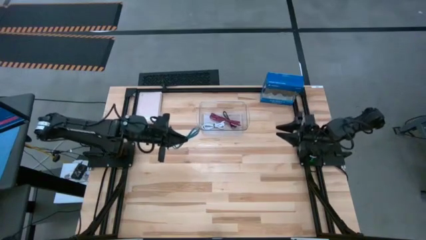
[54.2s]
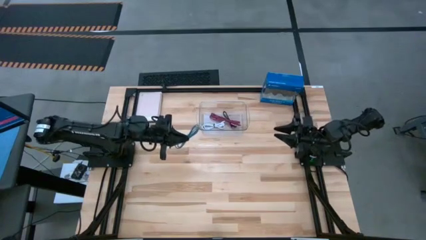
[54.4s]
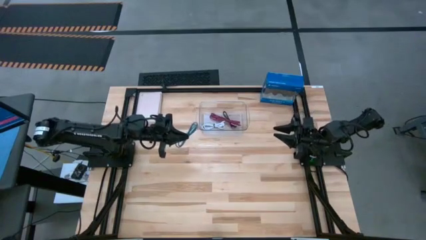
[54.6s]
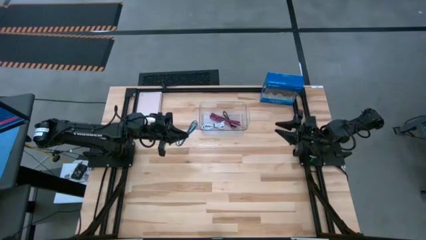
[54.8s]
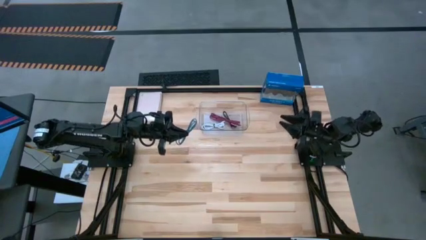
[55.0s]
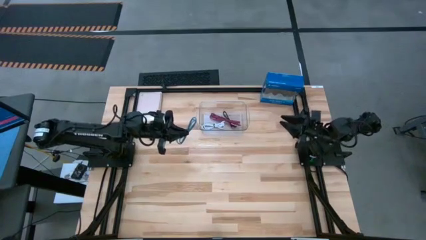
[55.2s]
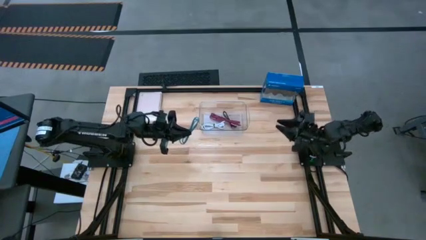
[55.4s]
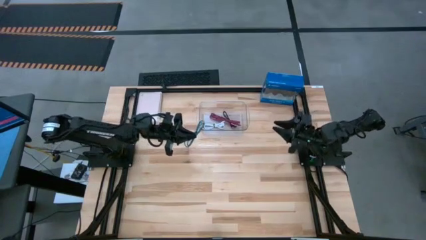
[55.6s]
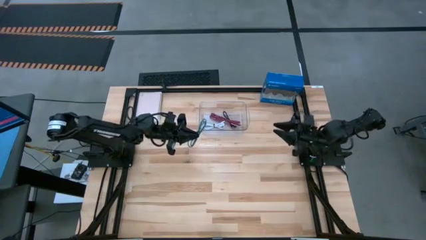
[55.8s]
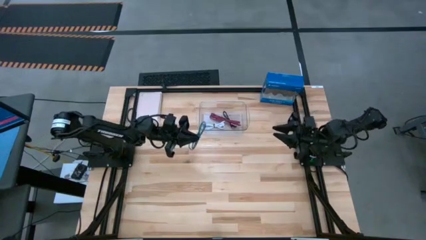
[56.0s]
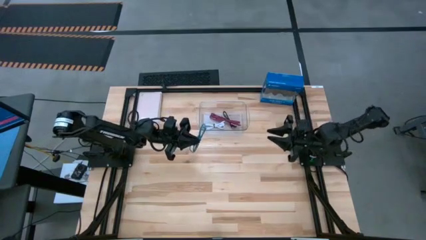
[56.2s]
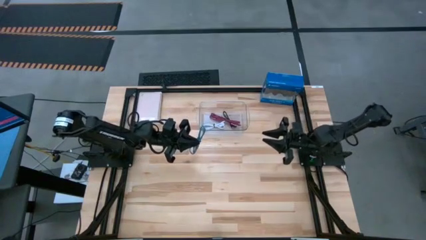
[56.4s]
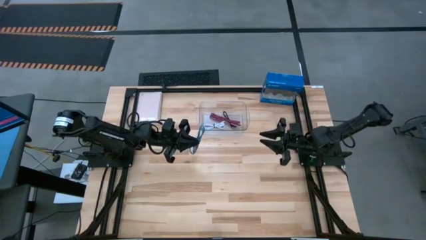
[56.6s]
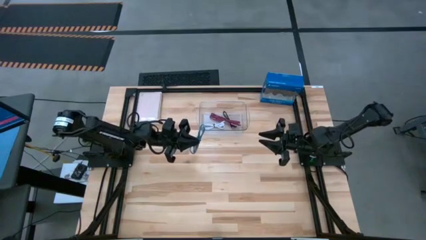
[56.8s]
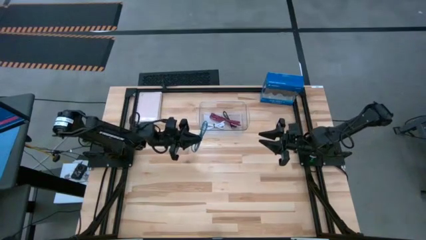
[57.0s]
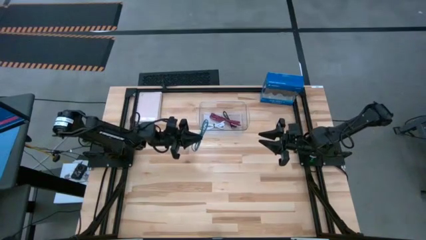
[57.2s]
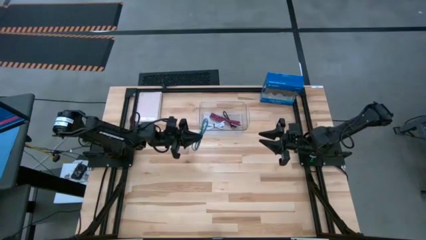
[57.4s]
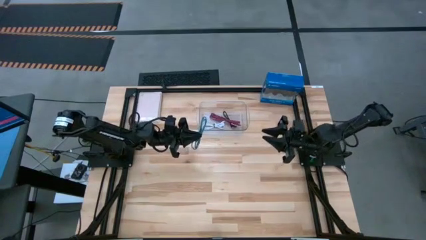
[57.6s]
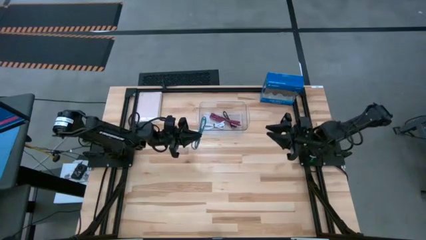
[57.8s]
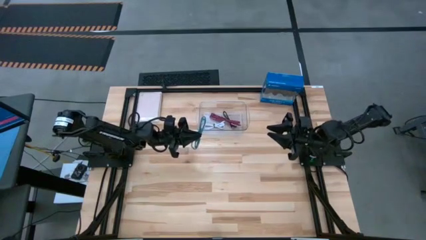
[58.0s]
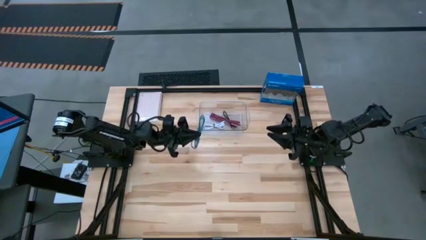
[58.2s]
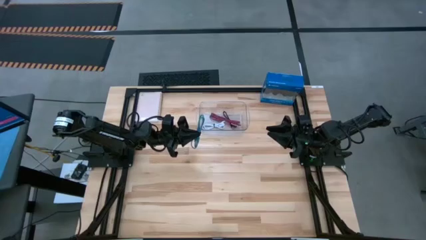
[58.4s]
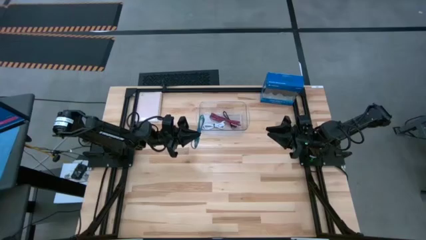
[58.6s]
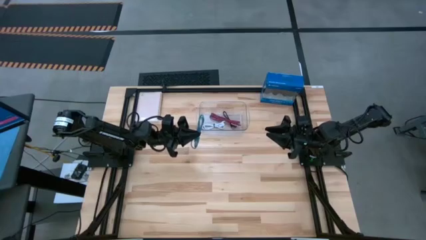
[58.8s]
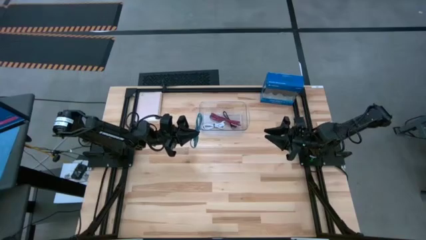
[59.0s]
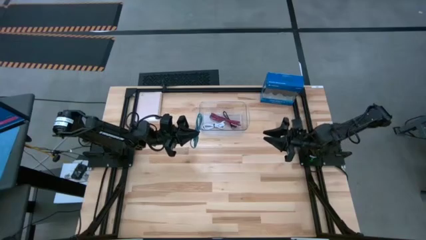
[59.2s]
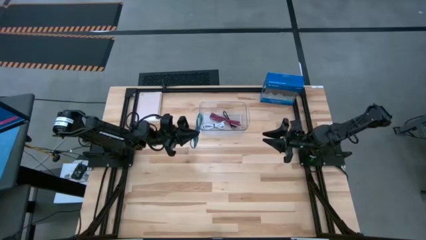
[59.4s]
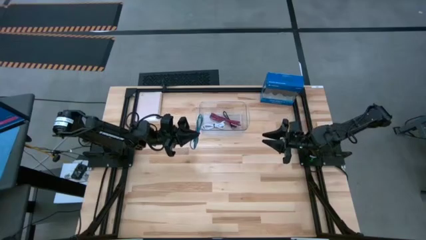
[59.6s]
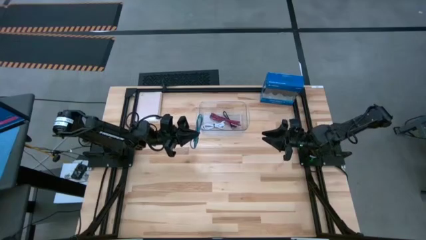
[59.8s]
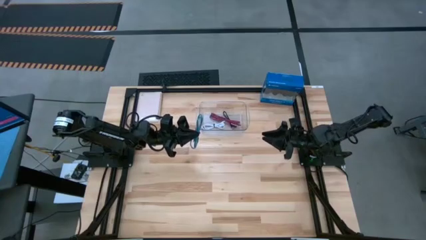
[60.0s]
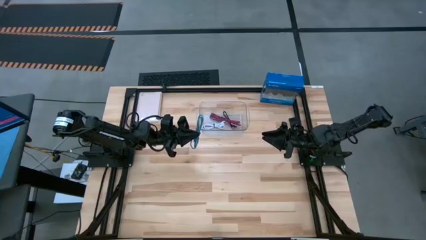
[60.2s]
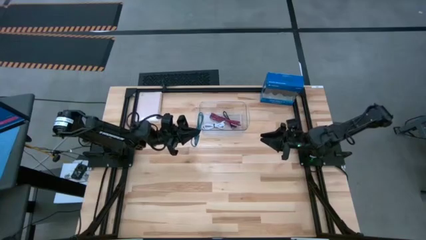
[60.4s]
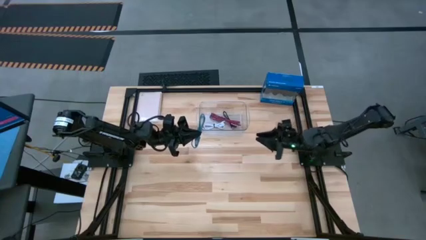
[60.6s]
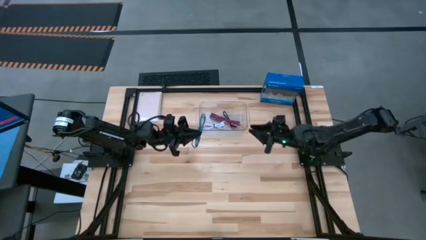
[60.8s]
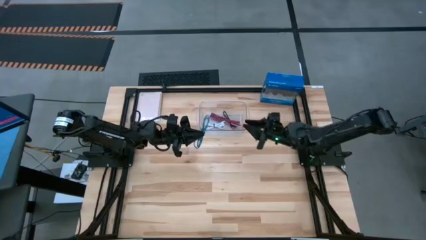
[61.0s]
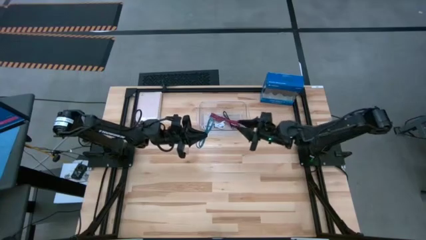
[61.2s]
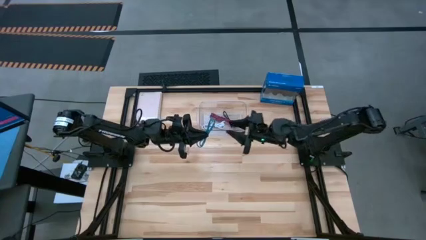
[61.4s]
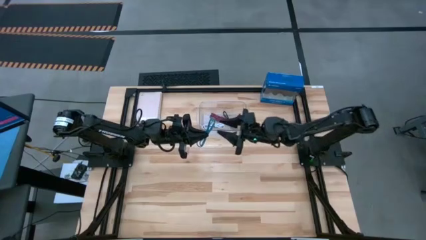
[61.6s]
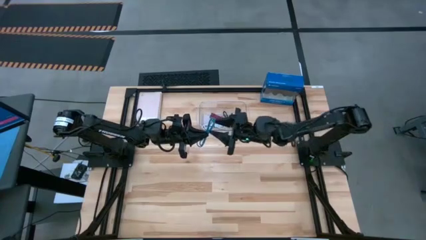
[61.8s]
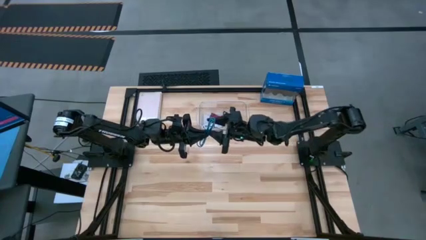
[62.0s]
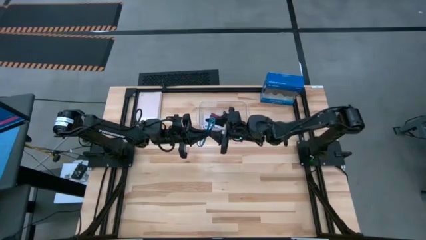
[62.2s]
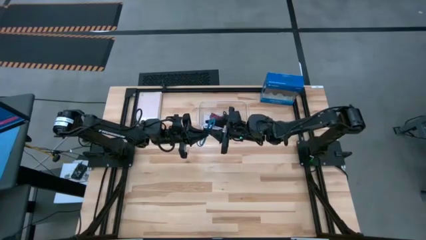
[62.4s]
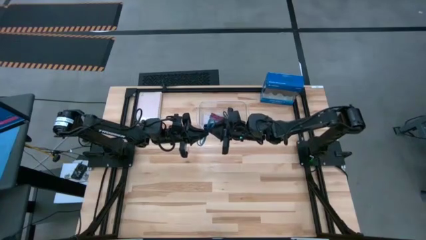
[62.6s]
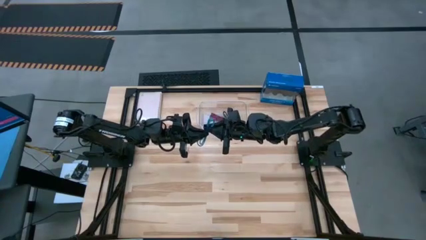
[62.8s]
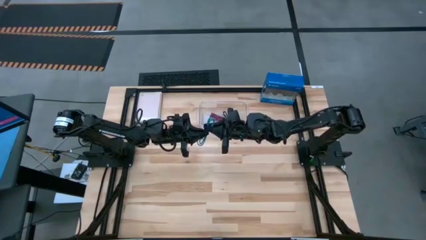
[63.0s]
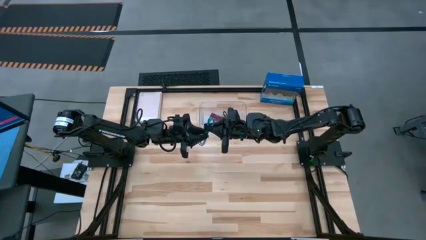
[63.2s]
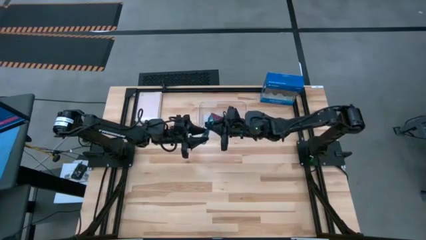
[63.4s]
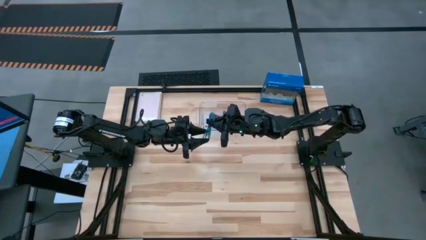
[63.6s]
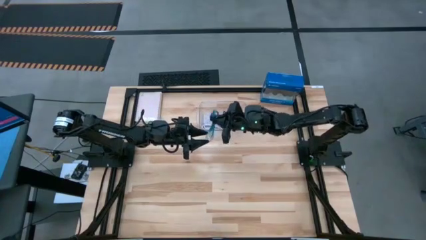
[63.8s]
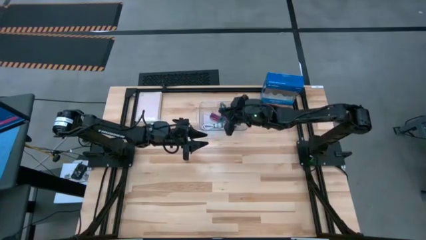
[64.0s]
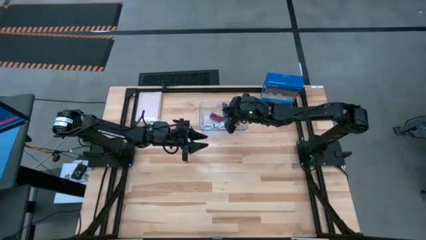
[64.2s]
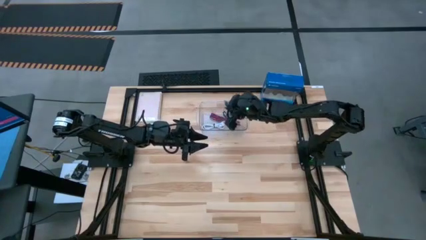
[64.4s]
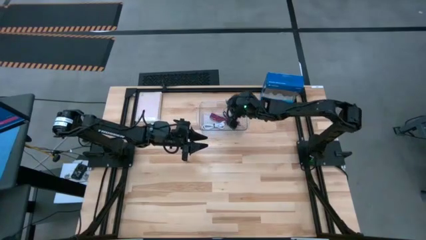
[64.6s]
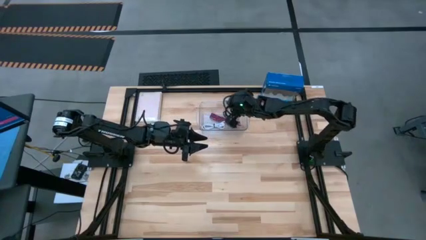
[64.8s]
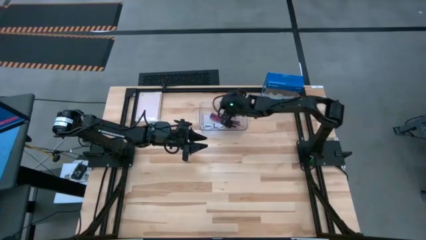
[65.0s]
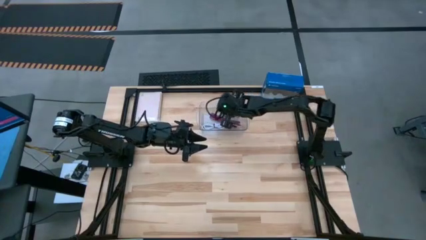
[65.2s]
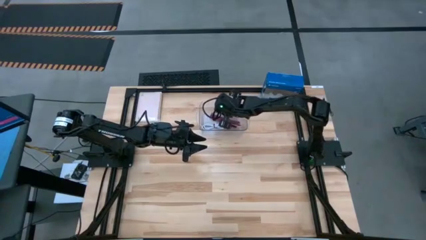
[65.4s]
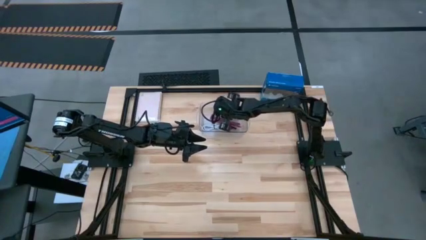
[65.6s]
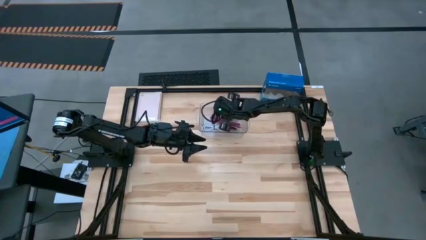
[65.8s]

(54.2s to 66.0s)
Task: Pick and place USB-C Cables
Put the blue charger cable into the transparent bin
